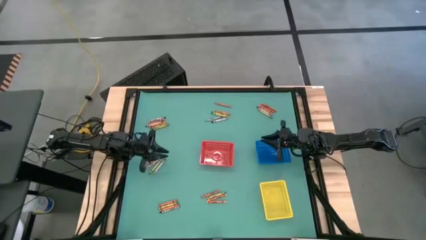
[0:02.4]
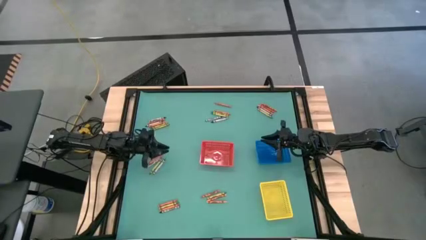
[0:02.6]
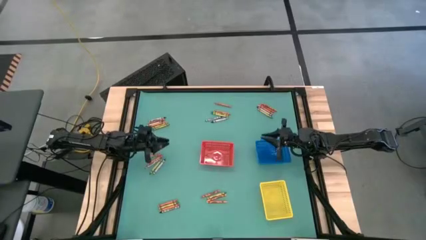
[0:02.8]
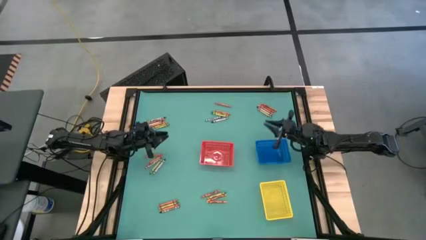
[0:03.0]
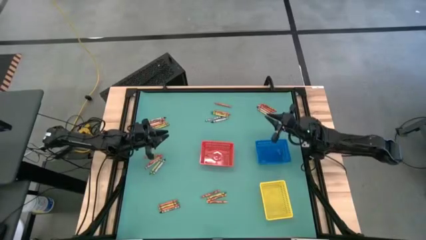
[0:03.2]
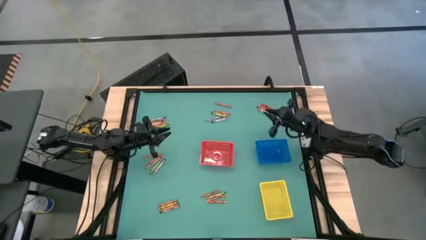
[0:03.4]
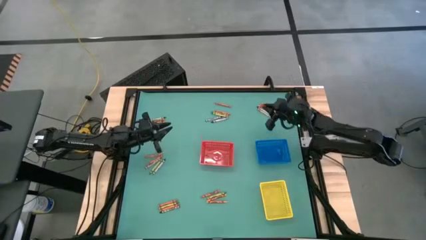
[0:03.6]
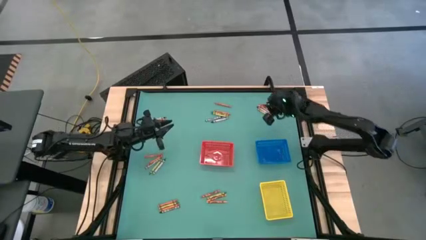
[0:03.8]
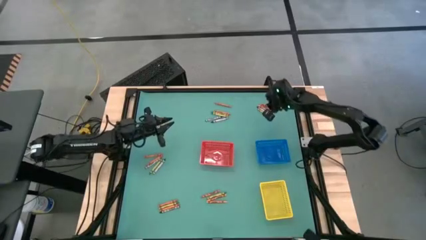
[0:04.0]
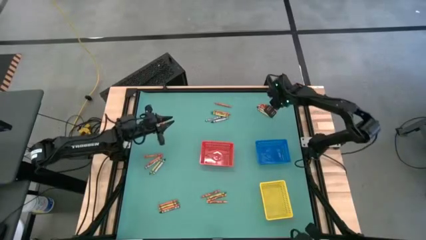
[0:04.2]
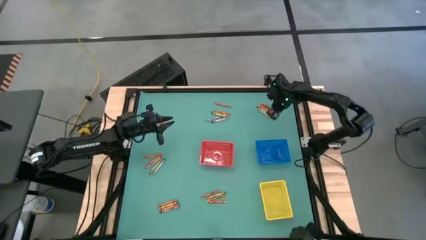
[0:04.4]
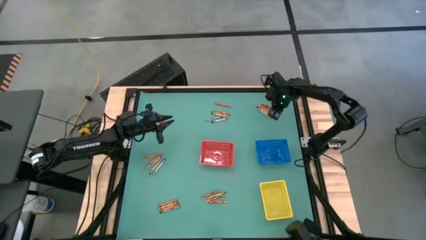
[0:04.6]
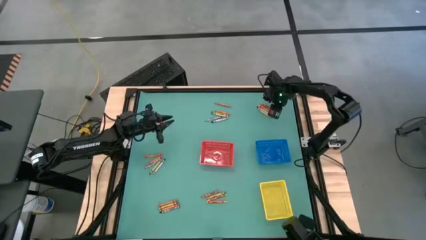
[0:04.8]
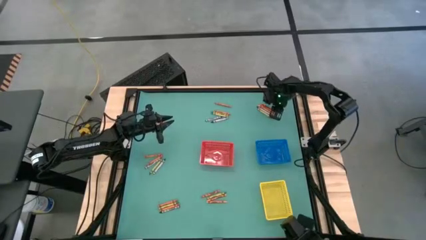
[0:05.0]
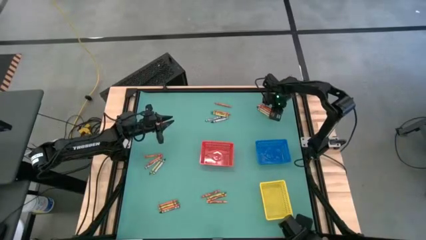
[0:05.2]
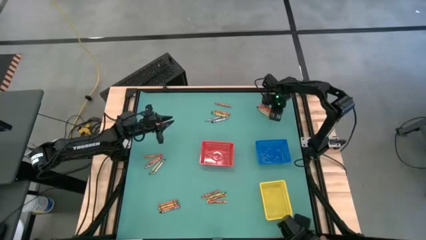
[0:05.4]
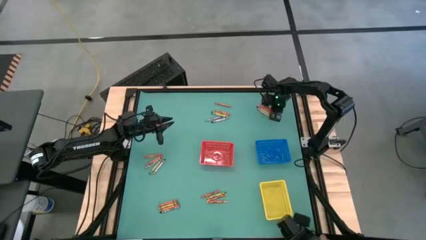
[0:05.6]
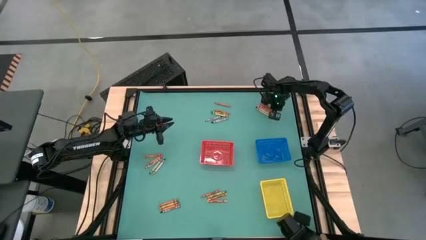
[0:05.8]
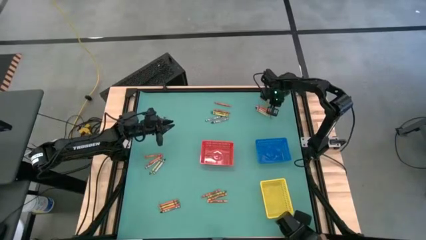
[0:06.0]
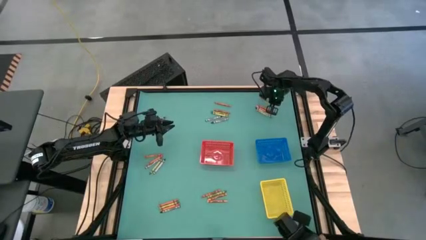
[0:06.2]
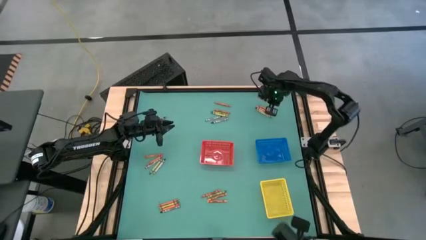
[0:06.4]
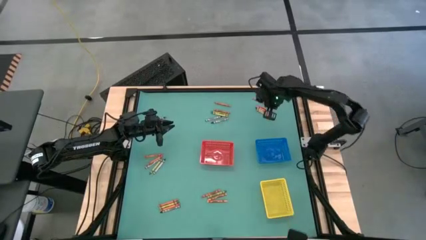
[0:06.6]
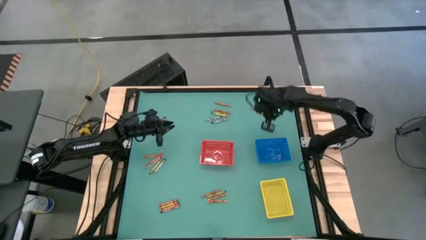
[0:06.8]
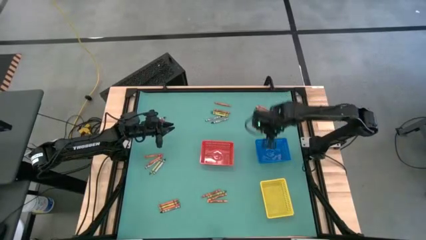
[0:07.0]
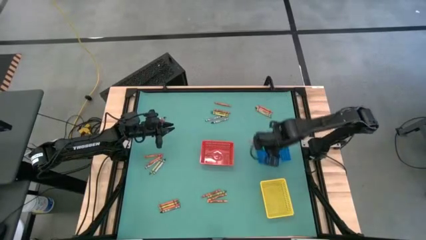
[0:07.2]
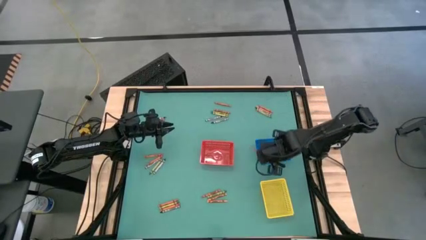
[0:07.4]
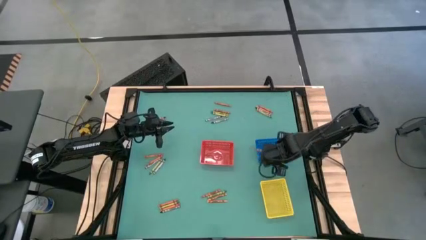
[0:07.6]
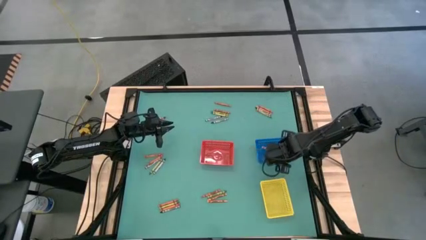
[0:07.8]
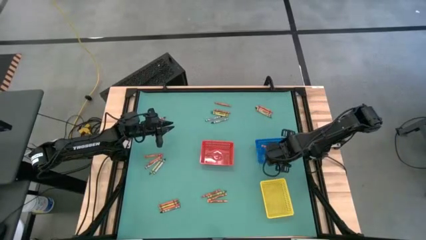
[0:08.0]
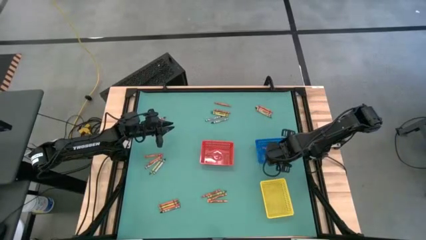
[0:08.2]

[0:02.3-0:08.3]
Task: Sort crayons
Put the orange crayon into the blue basket

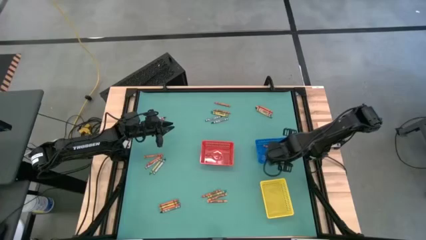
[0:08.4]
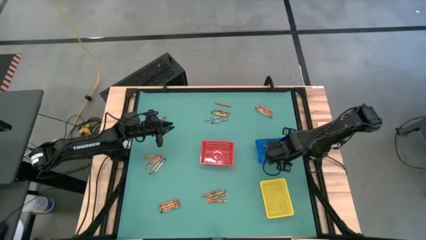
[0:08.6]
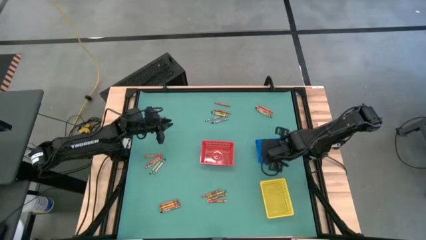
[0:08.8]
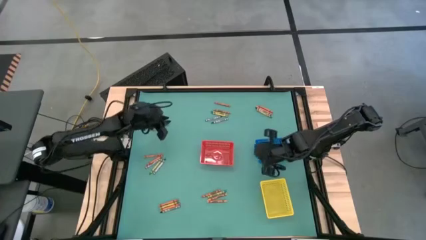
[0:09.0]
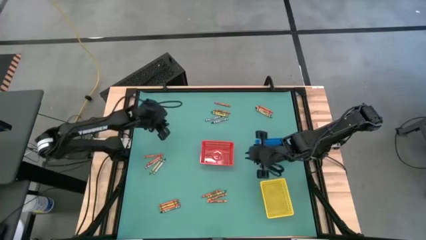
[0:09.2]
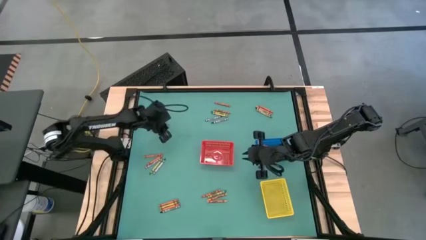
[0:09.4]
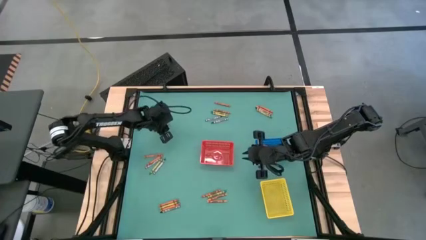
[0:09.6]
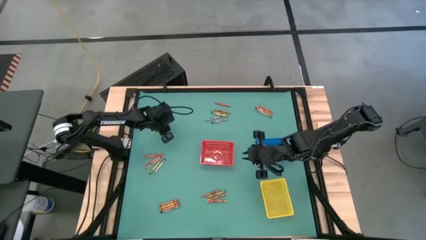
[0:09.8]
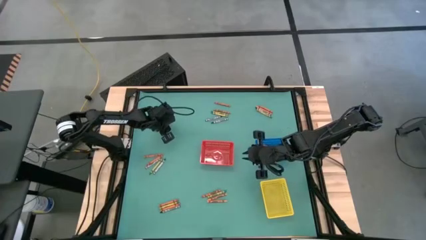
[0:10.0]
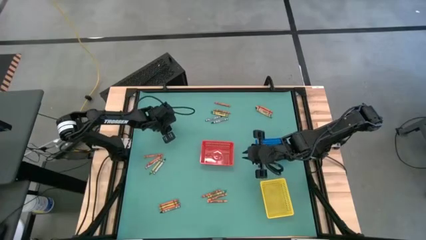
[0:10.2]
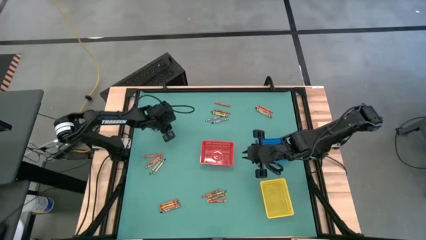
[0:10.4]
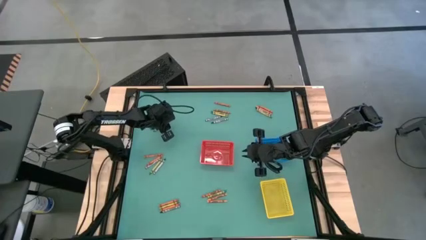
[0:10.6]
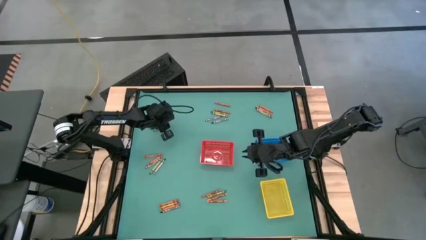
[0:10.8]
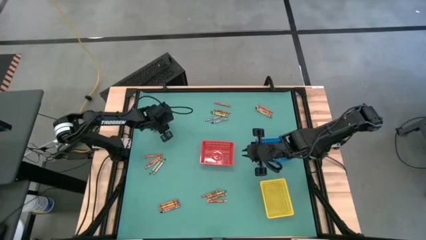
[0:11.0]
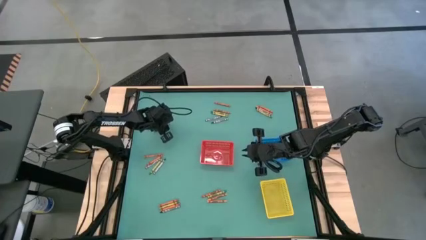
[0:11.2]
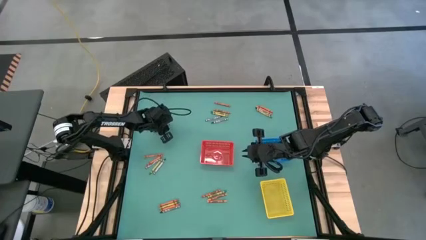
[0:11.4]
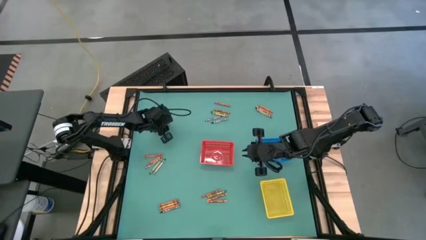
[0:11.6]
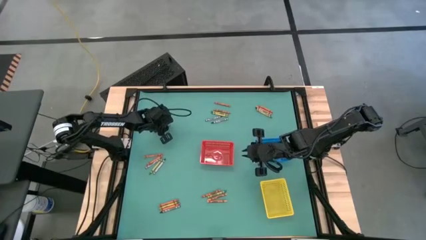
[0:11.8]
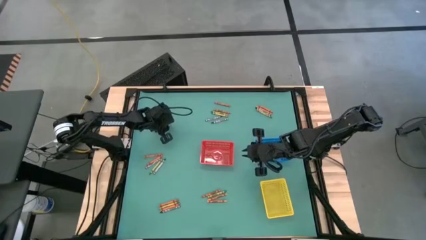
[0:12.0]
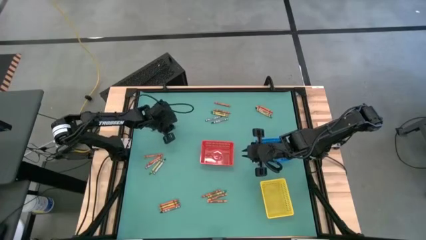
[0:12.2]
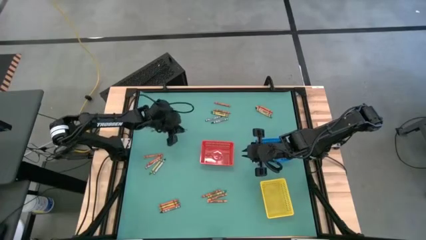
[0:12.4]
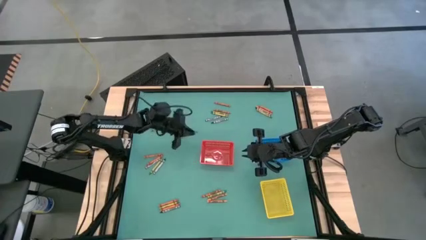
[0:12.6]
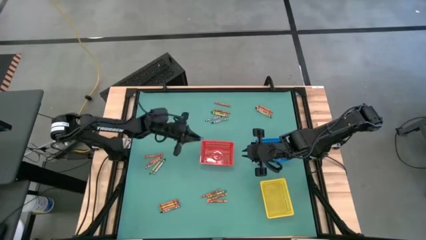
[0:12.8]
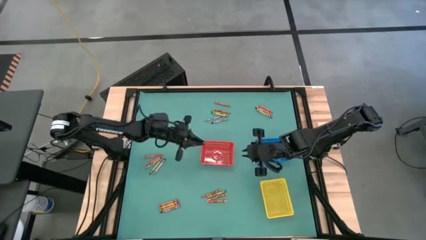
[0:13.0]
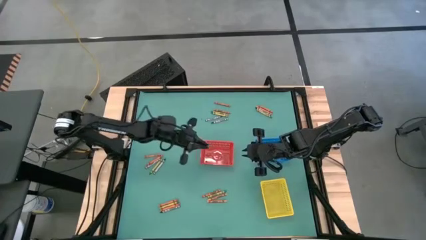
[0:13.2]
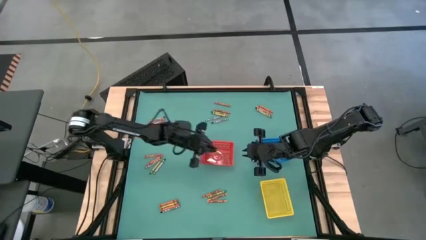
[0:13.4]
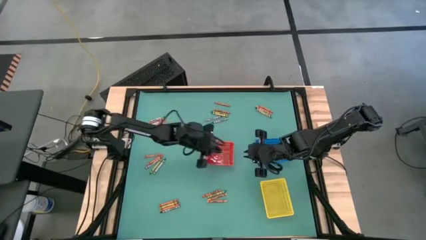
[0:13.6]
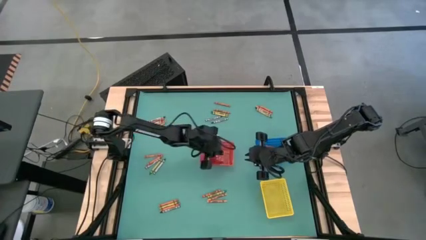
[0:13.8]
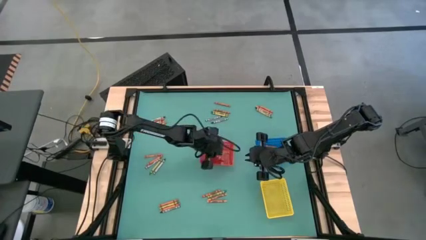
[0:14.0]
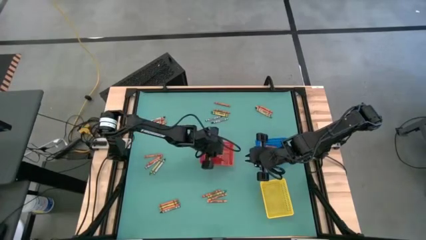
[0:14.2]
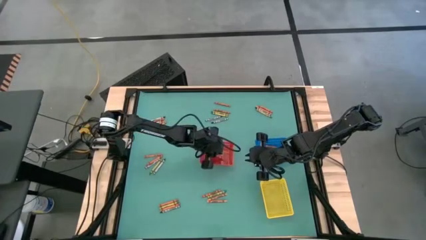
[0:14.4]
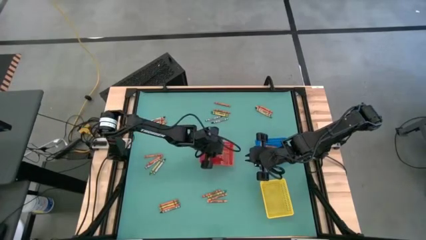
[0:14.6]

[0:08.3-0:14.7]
Put the green crayon into the red basket

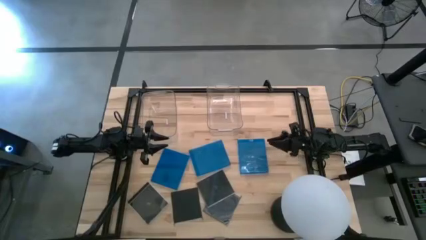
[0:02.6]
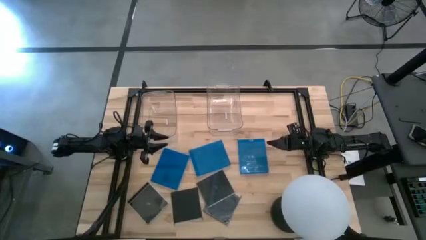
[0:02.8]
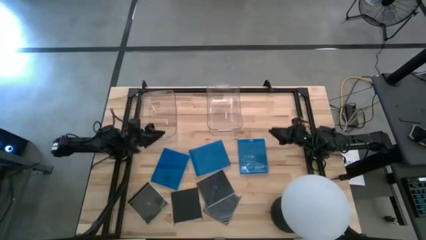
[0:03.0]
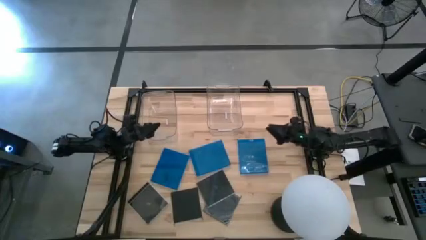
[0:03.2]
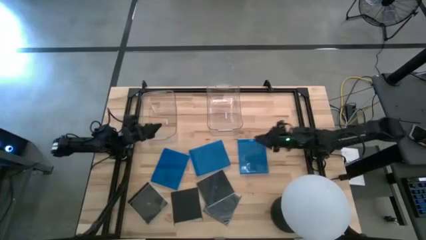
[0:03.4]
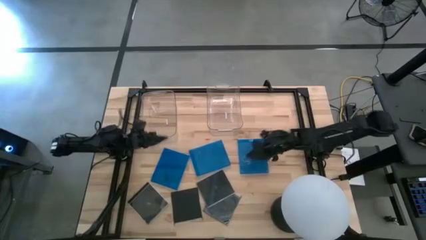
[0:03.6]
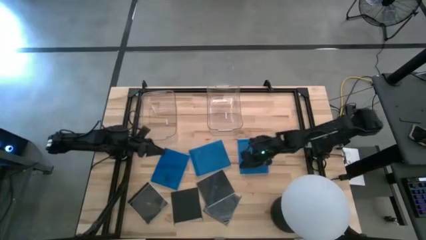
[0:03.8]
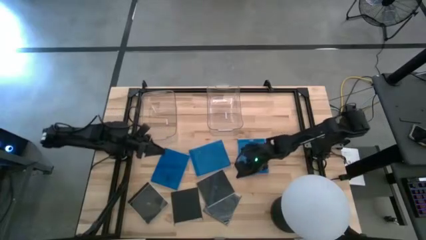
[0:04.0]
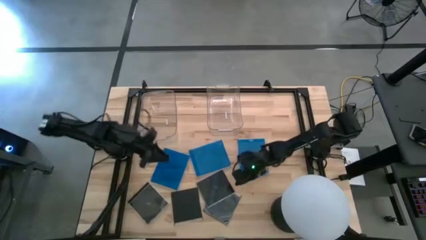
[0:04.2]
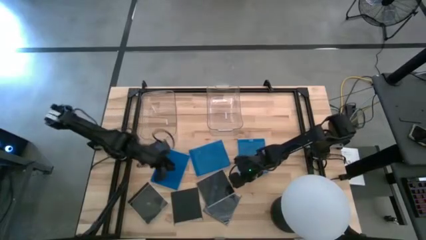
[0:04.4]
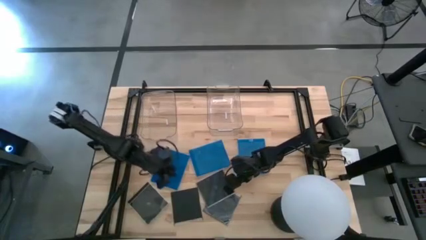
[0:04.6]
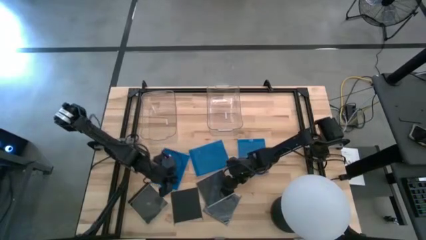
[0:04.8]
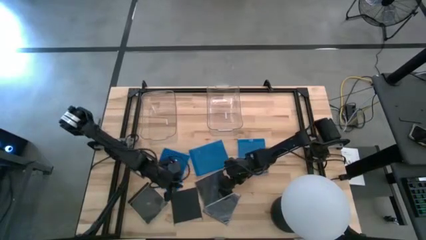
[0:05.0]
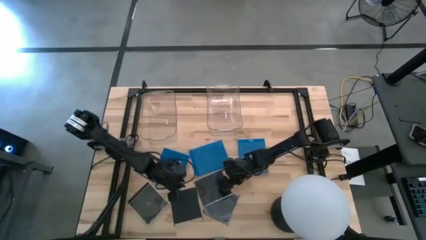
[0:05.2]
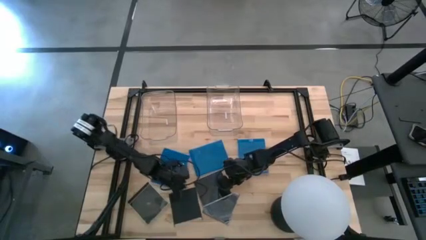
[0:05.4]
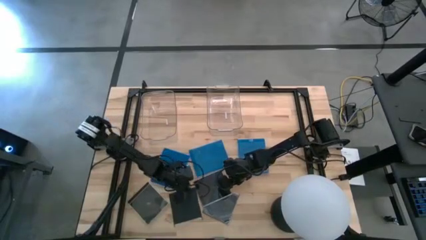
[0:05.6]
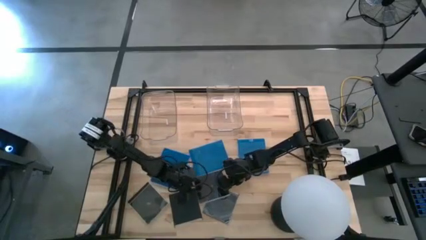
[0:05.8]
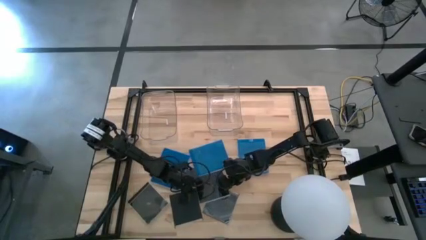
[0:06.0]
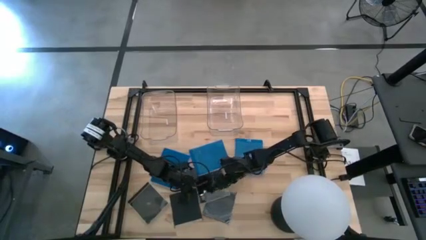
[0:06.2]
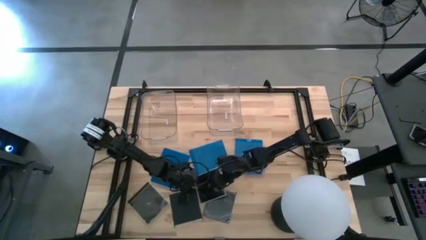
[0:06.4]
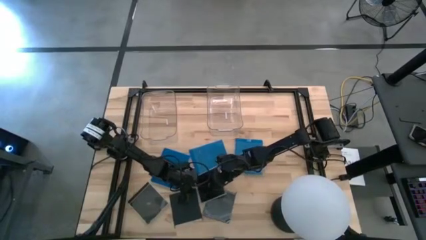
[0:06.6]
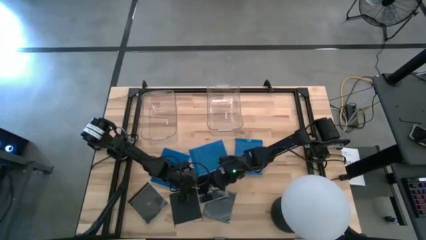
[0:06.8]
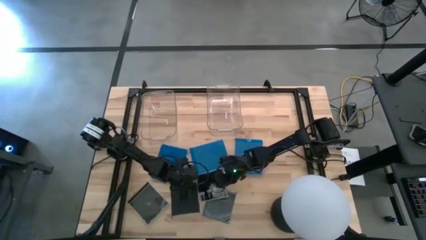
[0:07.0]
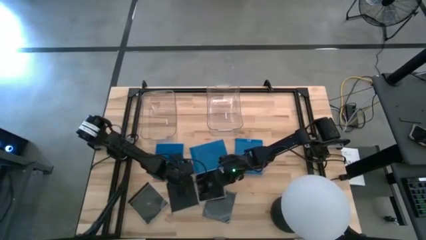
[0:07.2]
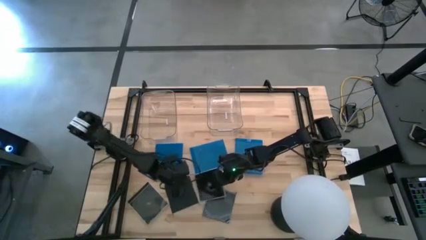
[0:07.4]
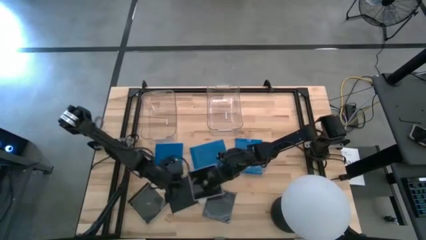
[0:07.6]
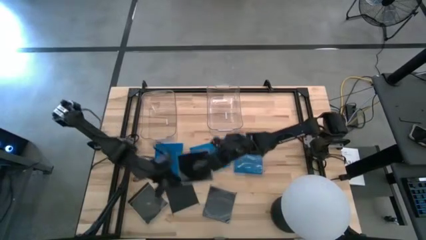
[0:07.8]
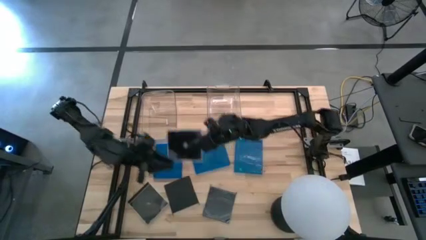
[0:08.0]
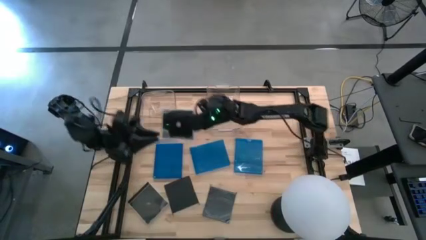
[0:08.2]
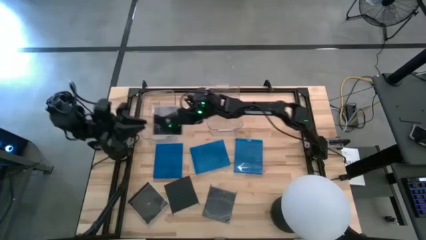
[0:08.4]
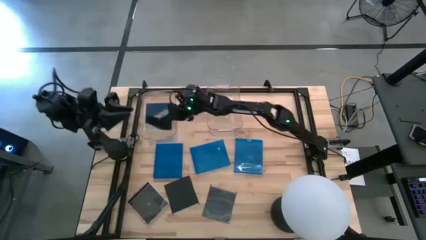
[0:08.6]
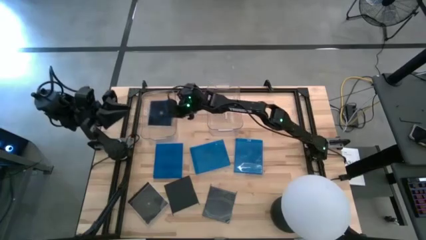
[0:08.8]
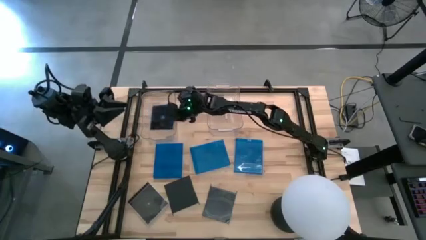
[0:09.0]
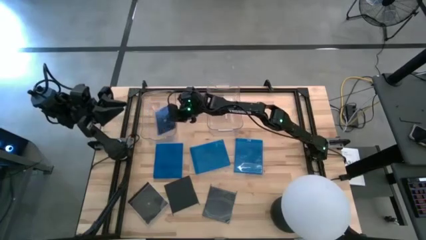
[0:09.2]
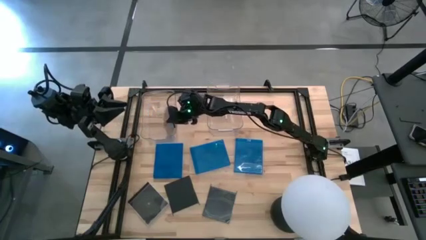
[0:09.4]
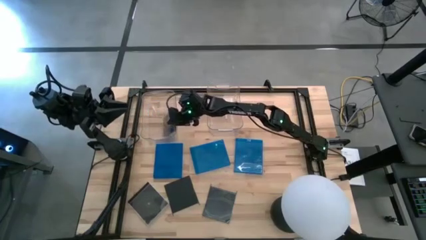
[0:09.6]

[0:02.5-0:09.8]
Task: Pick & place jewel cases by type
Put the black CD case into the left transparent bin
